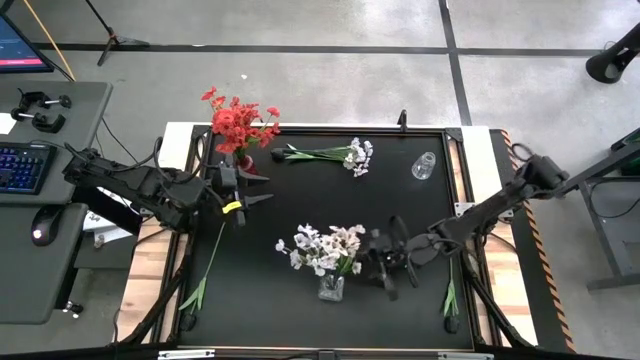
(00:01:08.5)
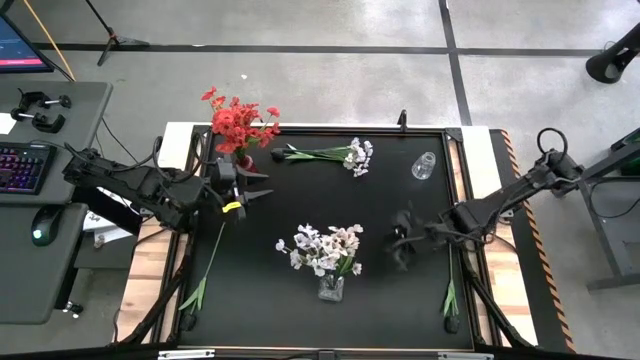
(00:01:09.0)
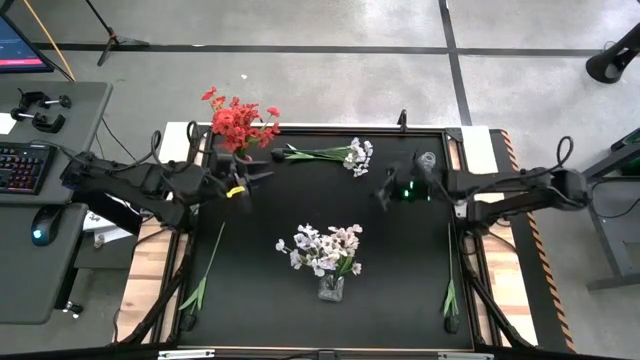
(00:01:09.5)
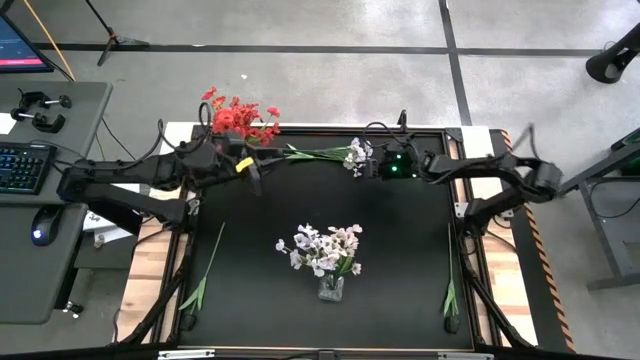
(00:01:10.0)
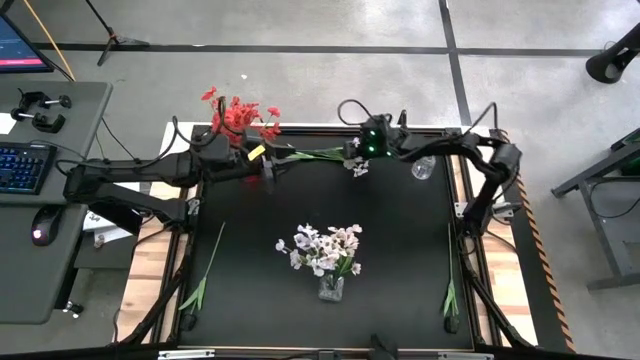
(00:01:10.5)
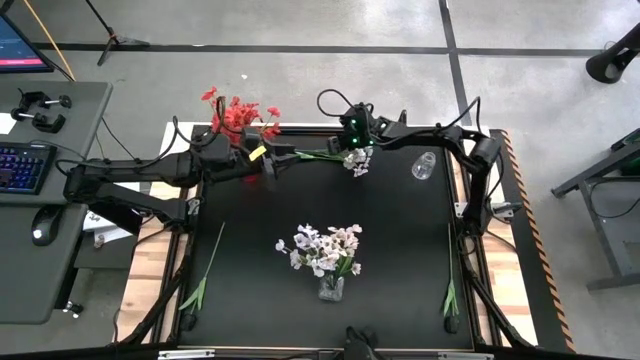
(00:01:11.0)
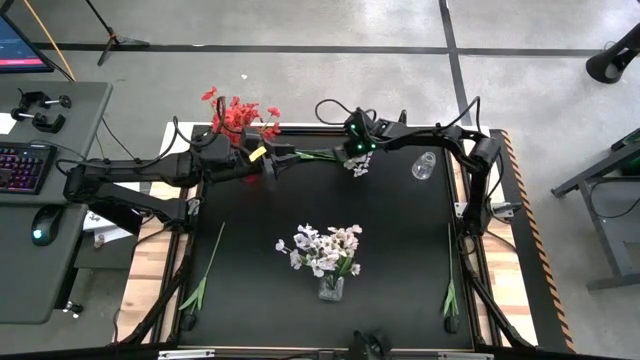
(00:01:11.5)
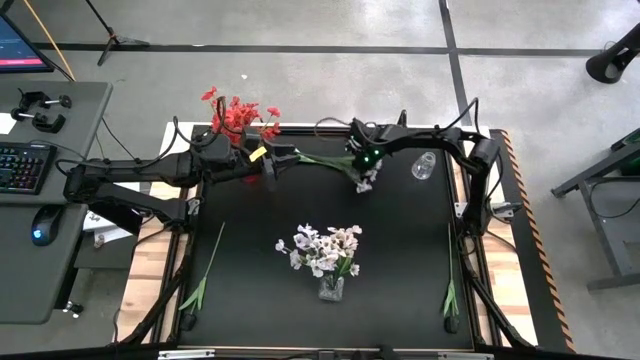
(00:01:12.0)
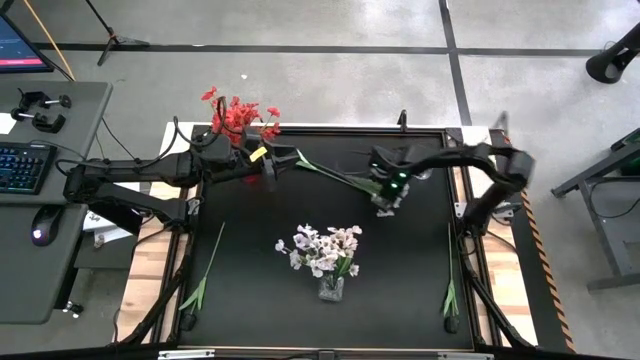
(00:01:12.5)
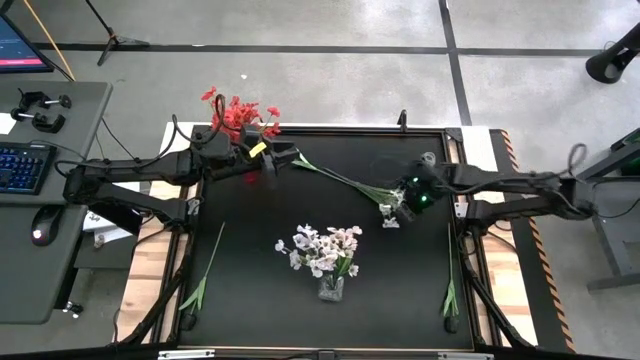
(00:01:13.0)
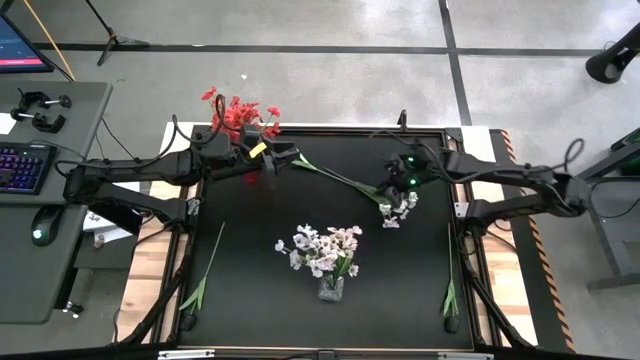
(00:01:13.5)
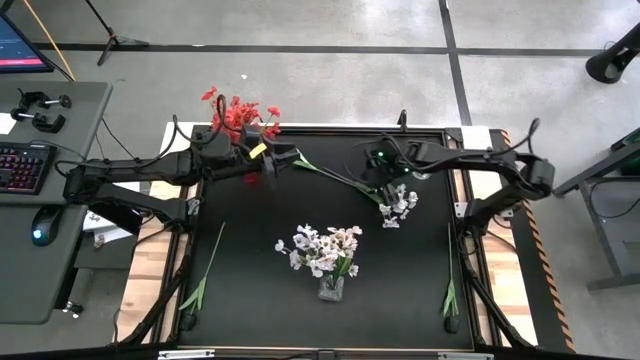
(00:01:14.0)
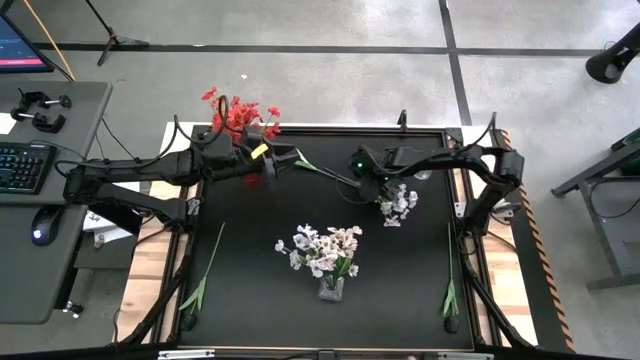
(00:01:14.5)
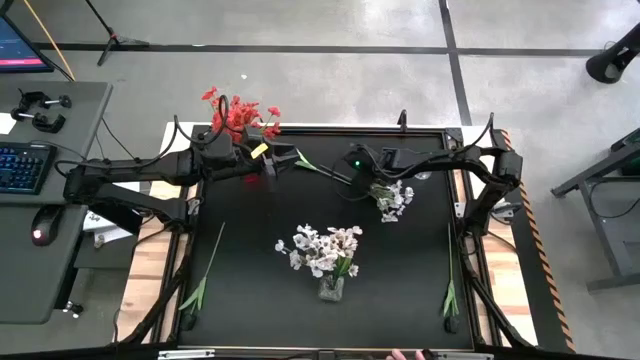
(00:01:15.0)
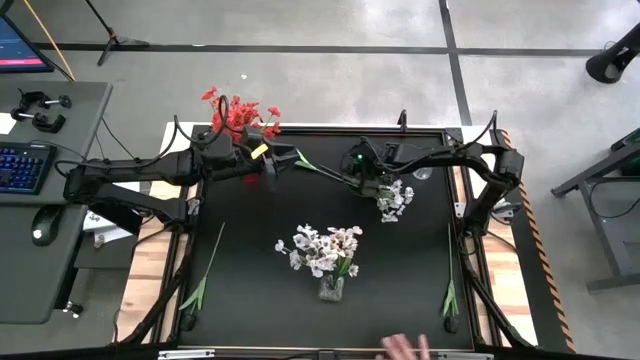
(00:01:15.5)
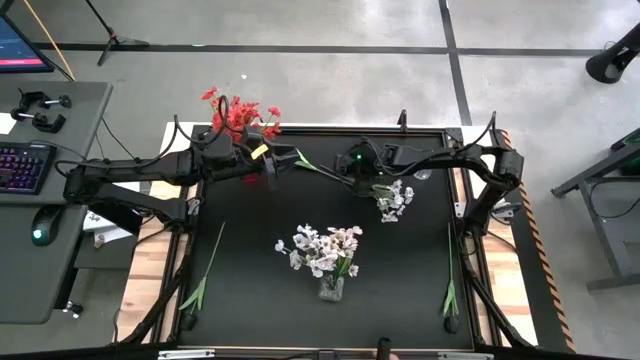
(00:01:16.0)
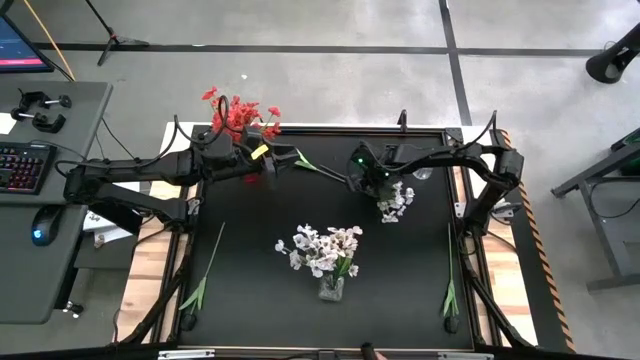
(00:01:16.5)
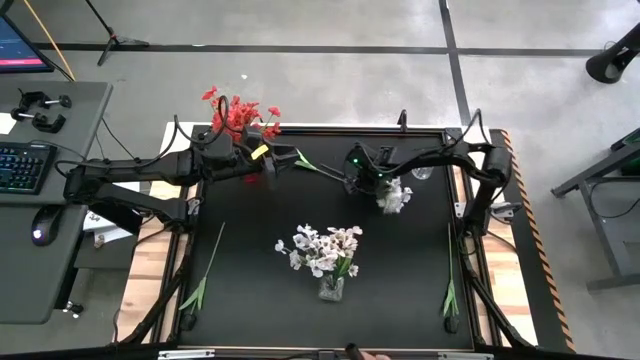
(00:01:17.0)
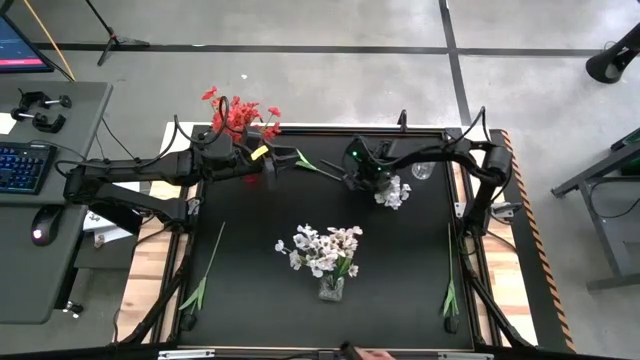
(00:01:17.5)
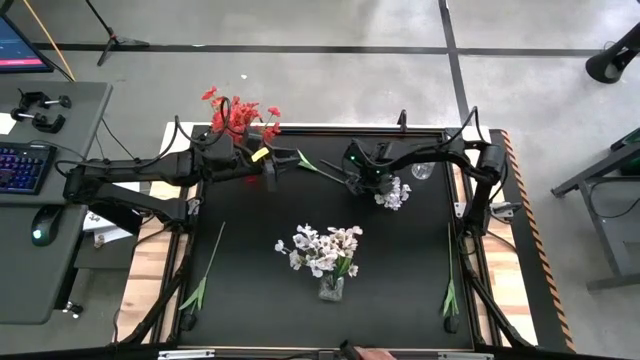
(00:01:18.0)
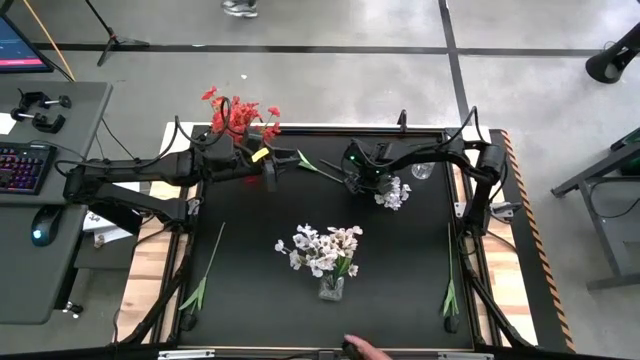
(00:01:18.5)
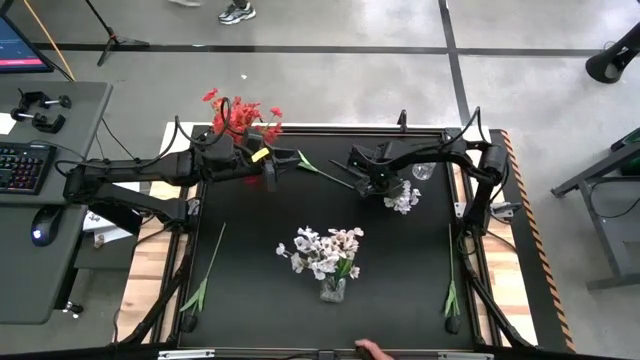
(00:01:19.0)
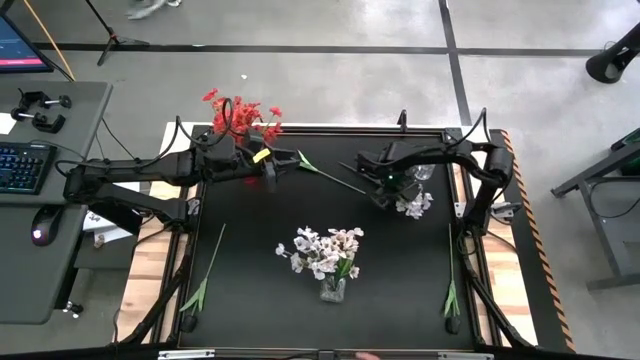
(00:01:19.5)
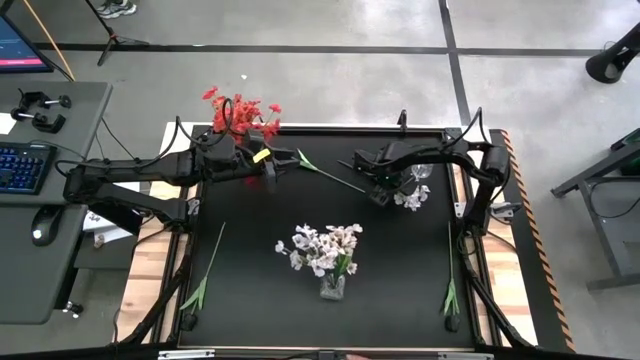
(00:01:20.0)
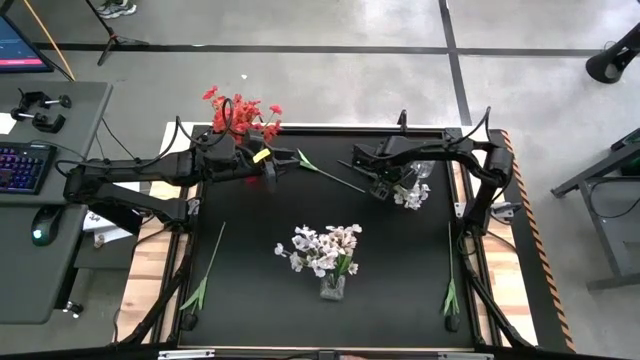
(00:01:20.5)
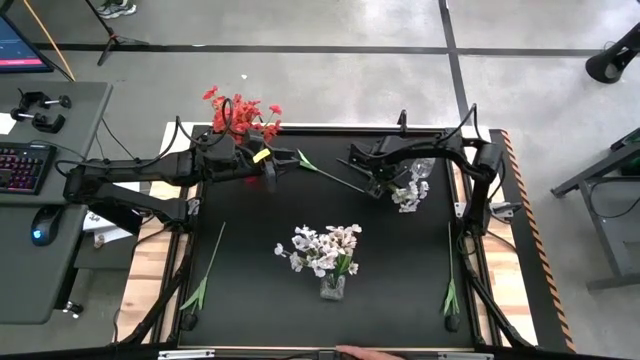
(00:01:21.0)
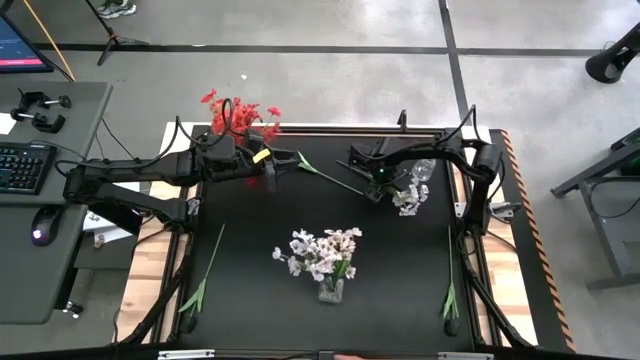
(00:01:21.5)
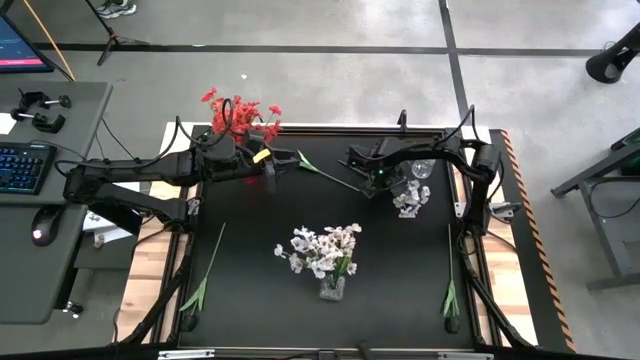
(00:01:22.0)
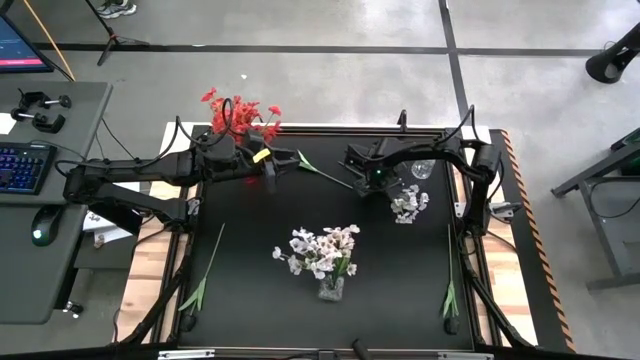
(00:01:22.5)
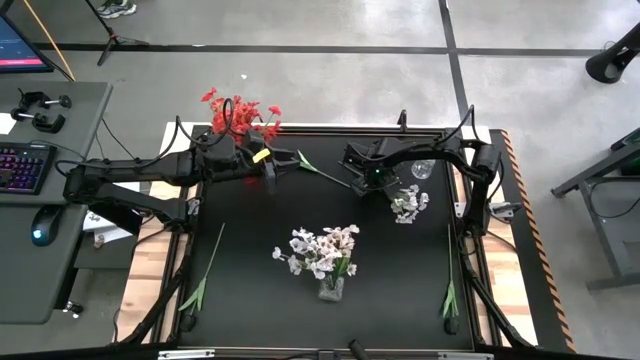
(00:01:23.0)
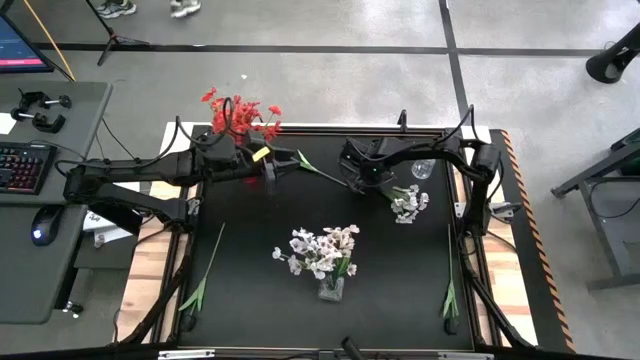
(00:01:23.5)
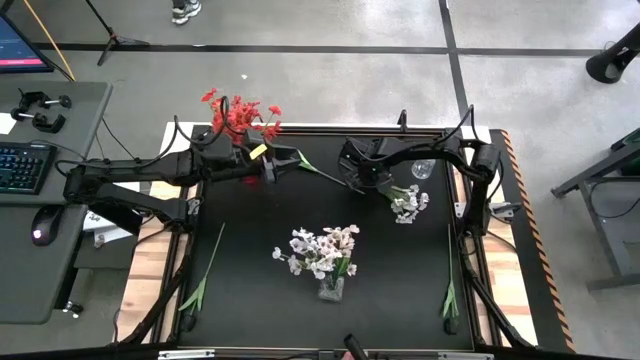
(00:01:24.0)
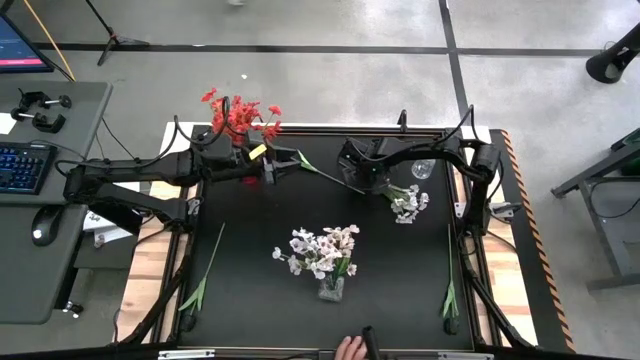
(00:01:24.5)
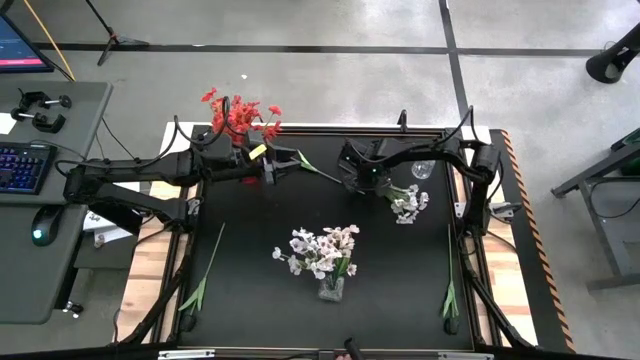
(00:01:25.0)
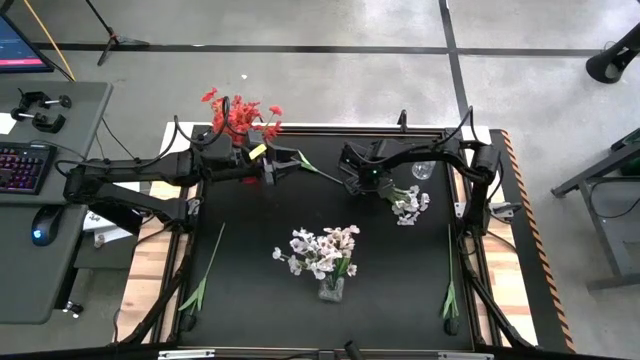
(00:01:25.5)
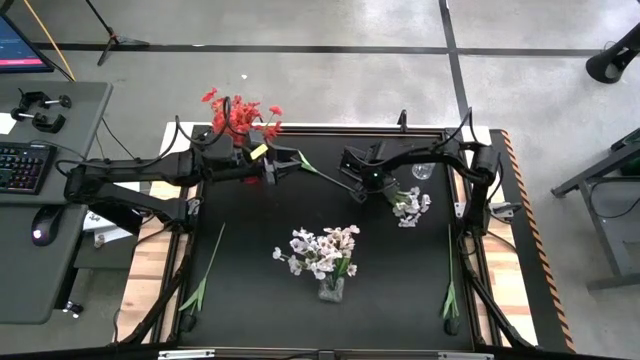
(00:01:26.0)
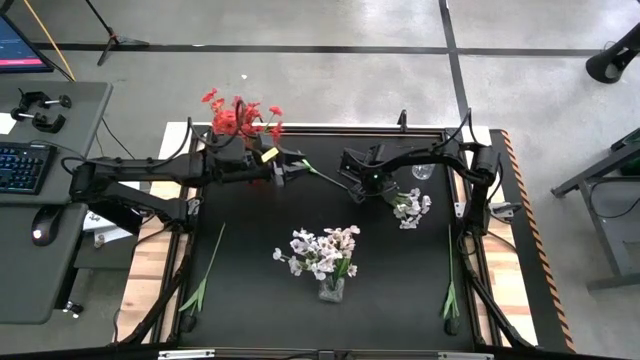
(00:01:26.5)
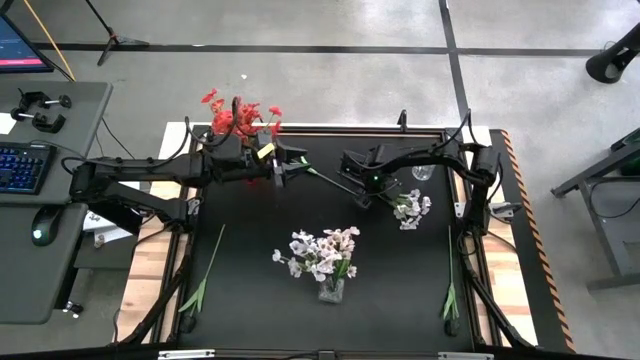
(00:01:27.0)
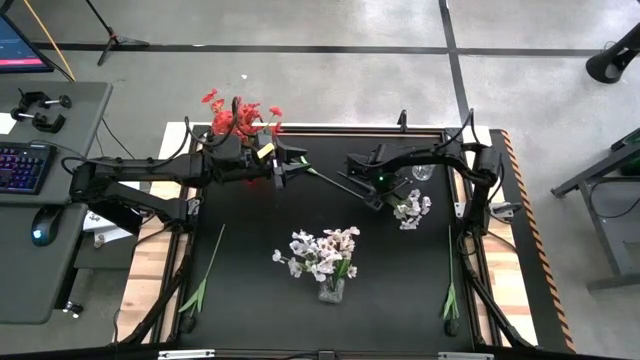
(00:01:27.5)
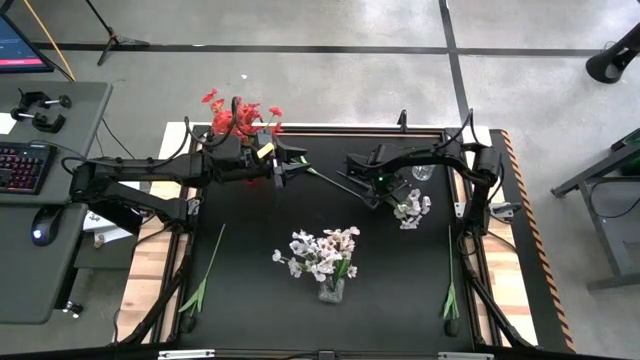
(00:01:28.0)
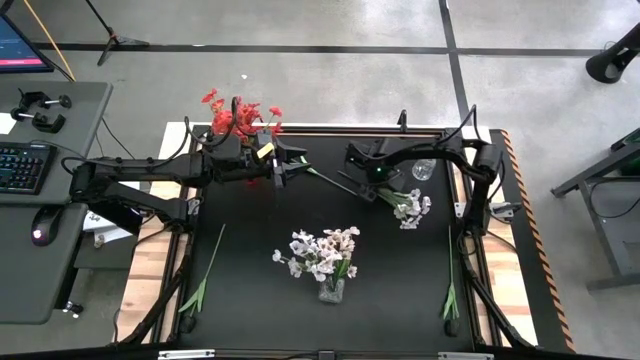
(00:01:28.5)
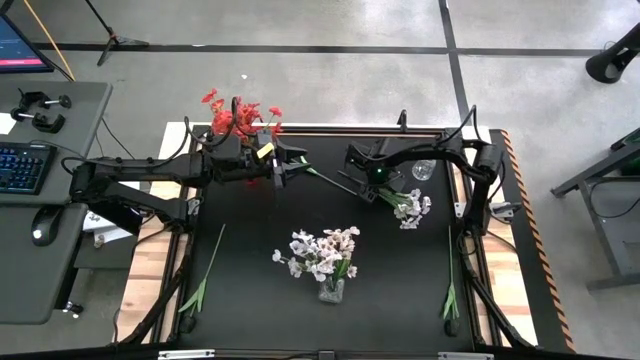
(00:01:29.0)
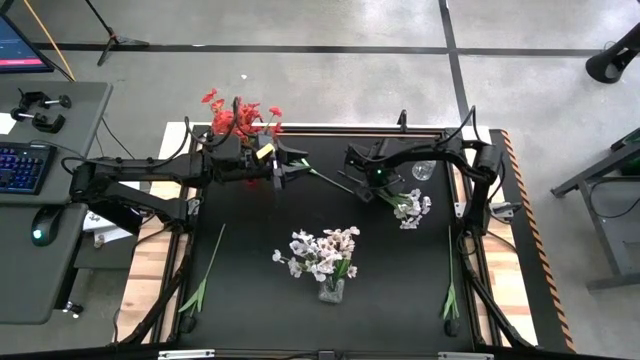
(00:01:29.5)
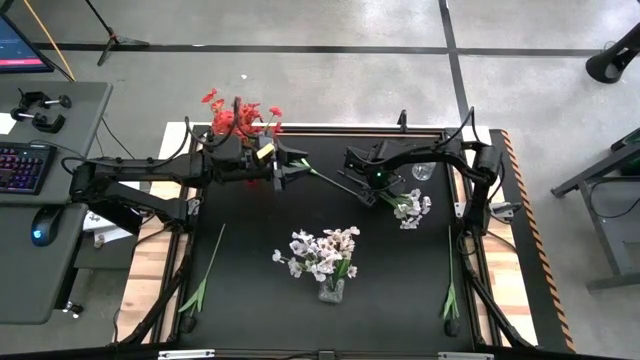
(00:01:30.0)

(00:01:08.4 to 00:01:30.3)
Task: Sort flowers into vase by color
Put the white flowers into the bottom transparent vase
